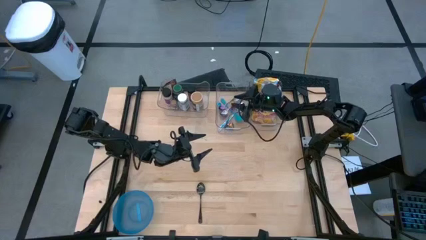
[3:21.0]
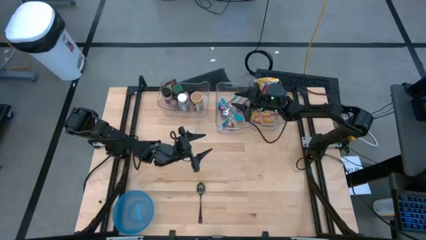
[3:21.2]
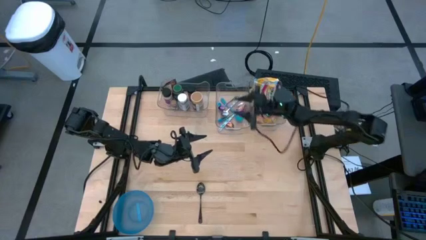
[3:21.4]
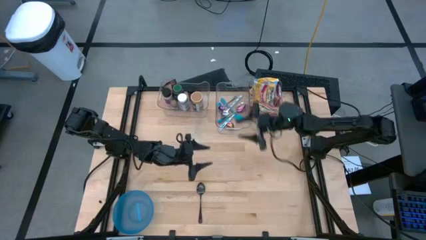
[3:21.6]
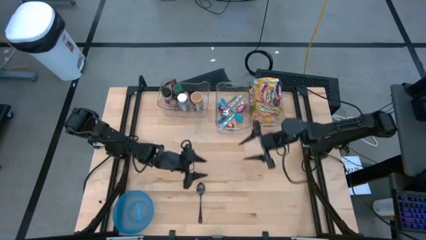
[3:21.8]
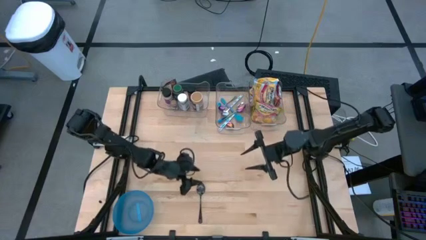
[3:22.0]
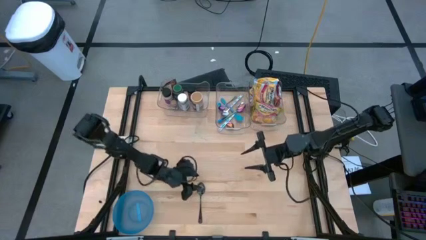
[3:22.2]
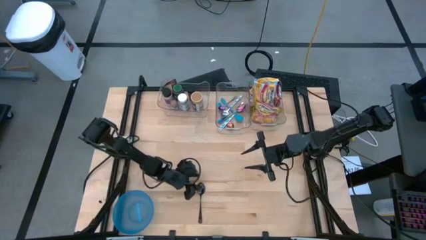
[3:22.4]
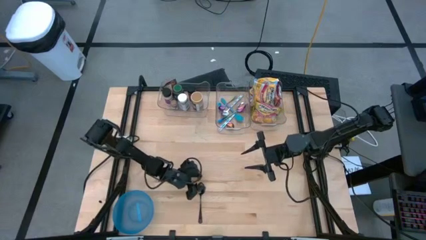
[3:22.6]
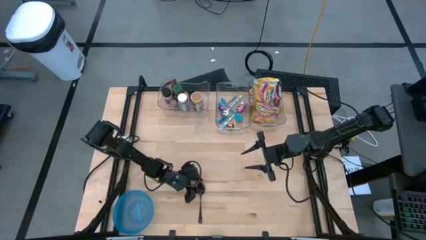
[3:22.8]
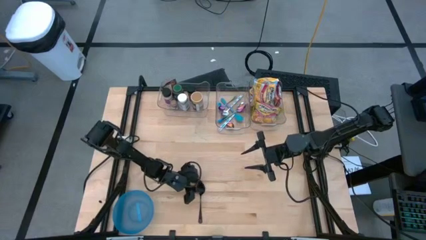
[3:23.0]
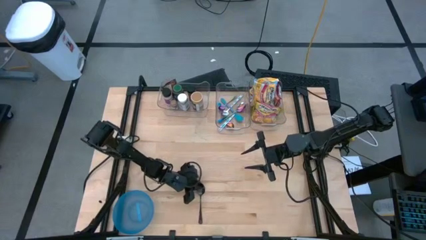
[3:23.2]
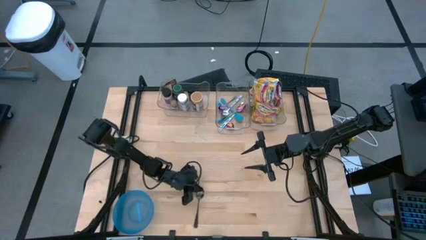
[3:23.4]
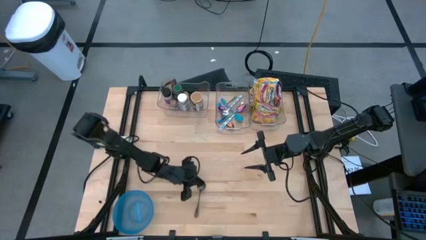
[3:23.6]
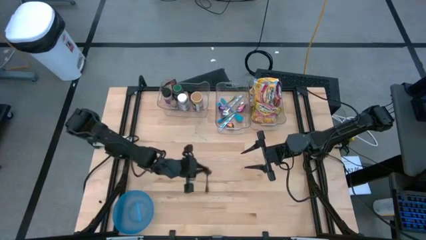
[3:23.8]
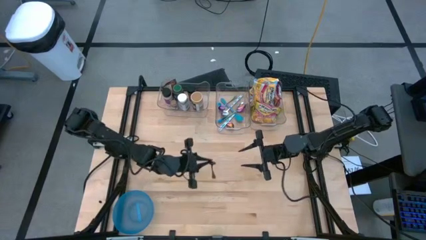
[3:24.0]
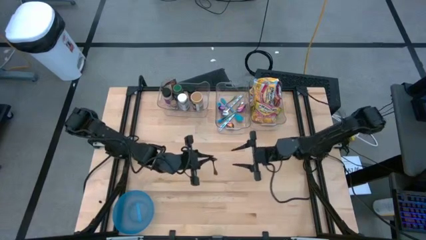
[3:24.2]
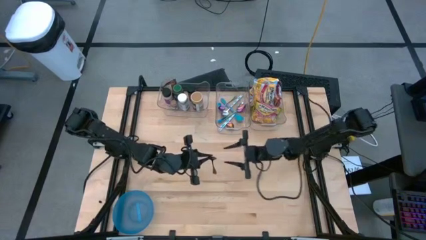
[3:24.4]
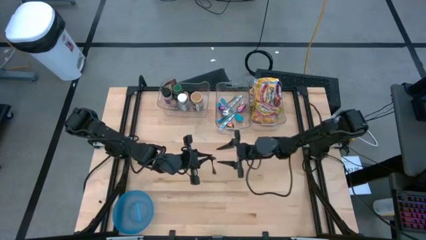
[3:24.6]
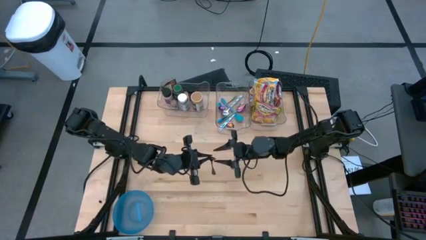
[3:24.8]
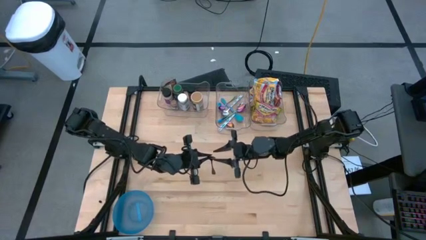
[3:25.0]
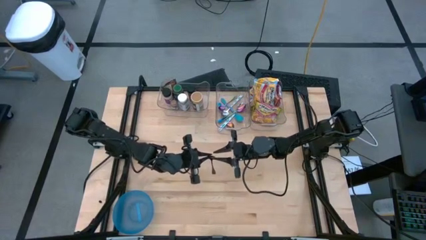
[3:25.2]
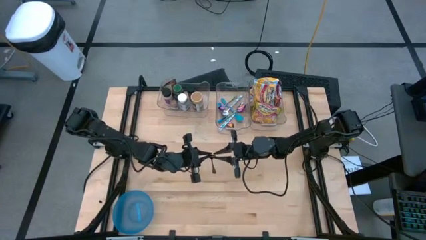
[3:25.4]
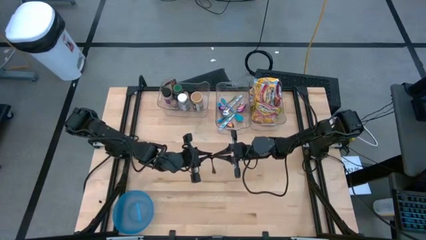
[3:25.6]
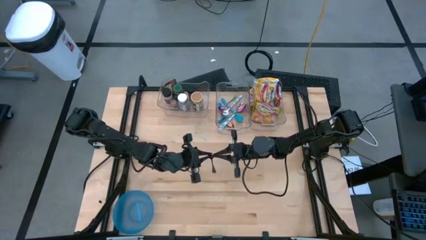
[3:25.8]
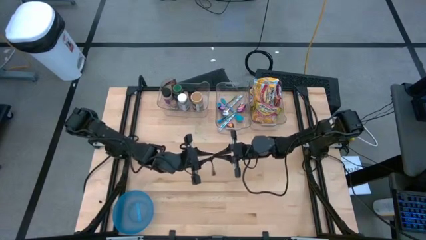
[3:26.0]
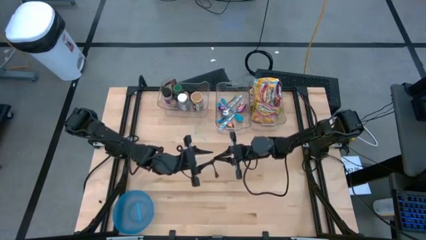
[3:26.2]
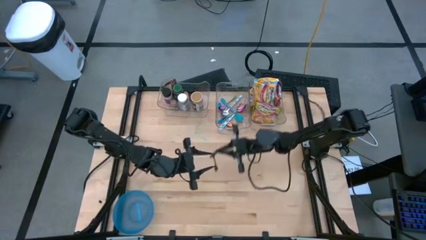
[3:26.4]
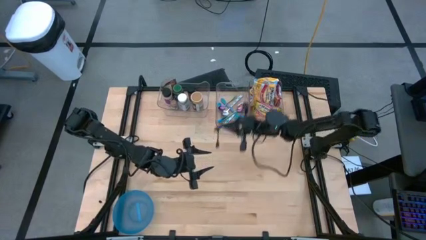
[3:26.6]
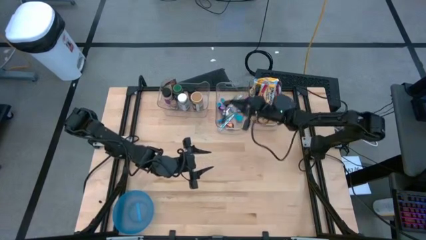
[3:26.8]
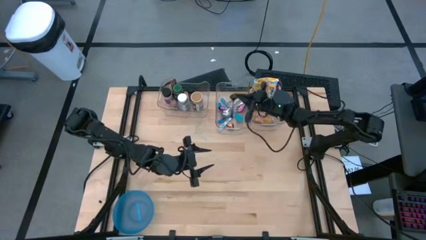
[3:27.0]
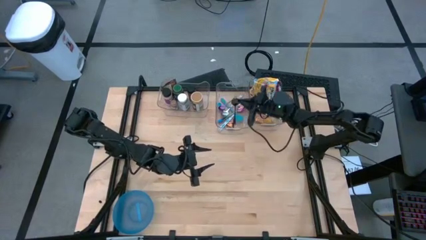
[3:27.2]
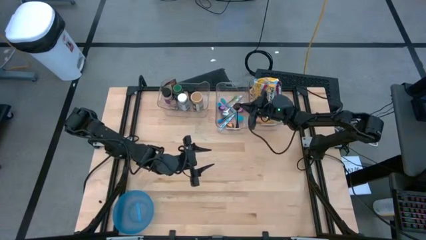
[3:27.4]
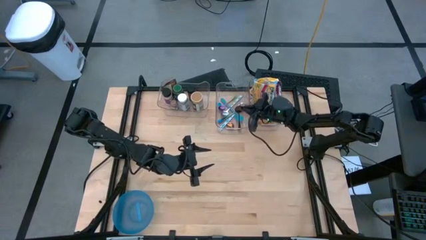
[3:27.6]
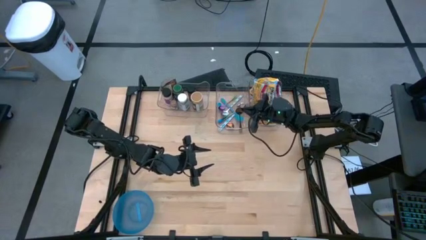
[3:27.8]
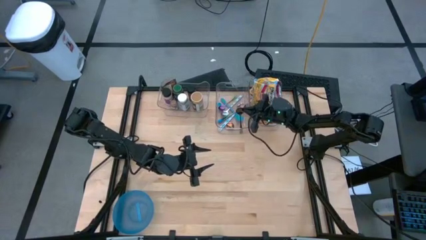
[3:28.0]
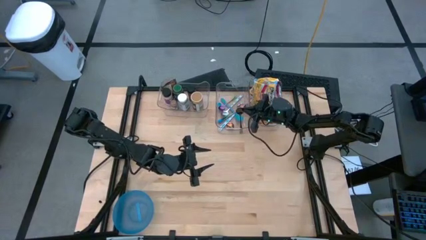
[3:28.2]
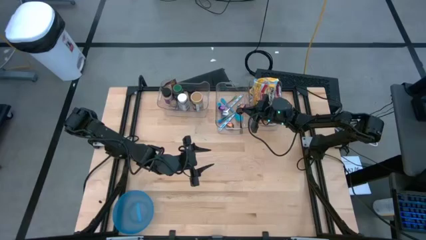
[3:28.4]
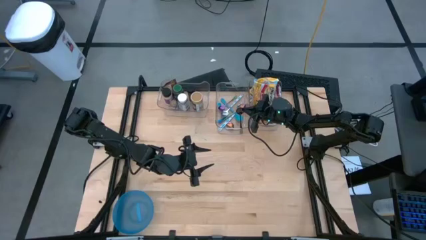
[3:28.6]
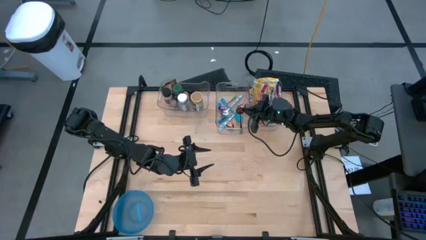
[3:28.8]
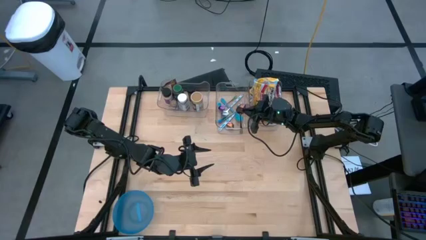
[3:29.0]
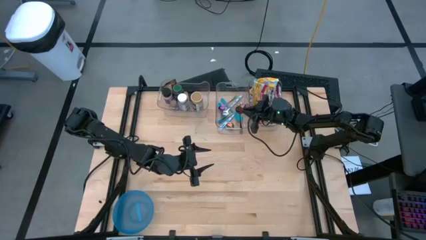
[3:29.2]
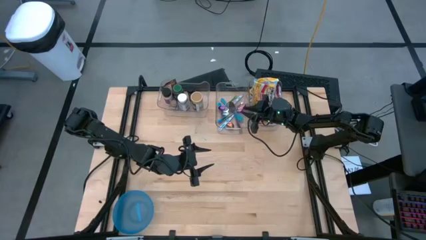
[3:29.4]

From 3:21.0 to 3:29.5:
Task: Pick & Place Food Item
Put the black spoon into the middle transparent bin

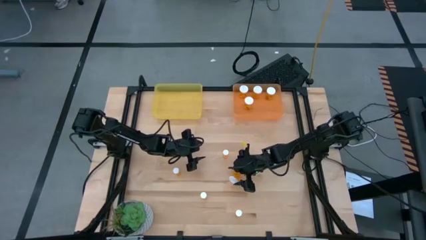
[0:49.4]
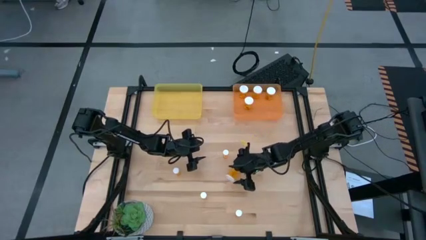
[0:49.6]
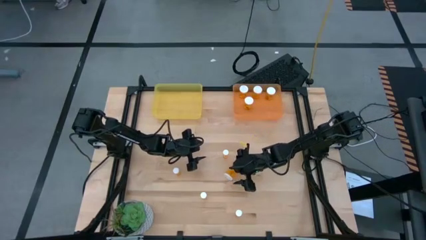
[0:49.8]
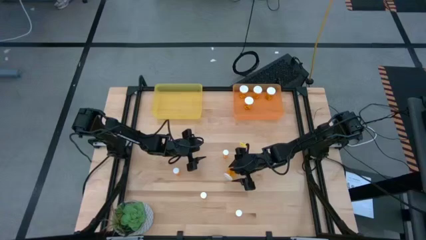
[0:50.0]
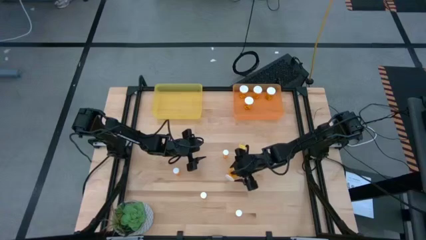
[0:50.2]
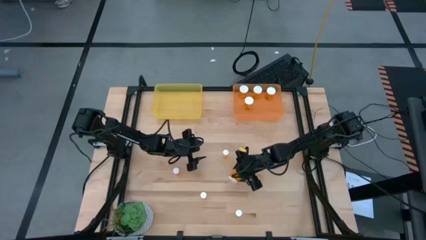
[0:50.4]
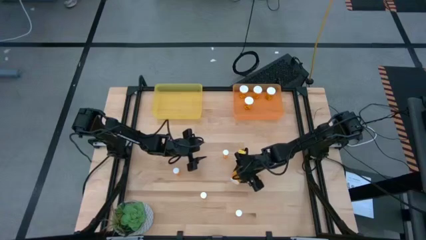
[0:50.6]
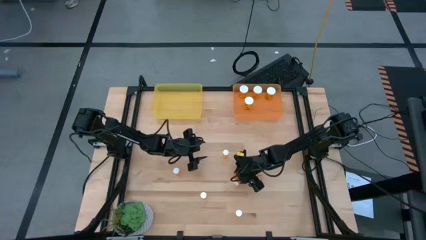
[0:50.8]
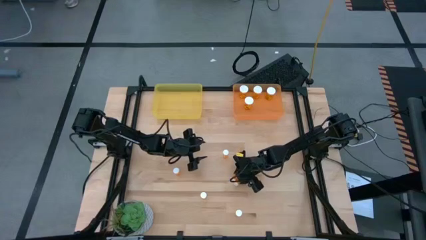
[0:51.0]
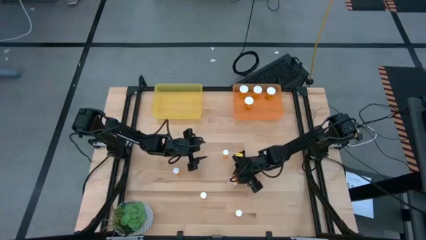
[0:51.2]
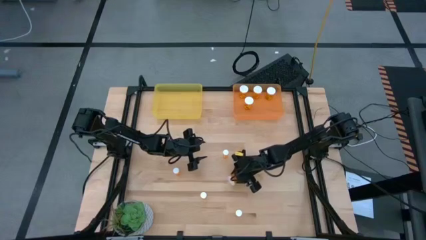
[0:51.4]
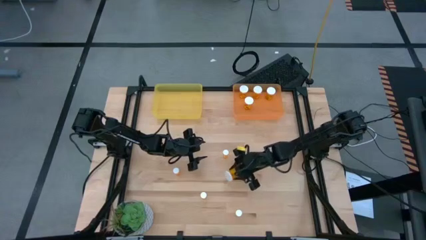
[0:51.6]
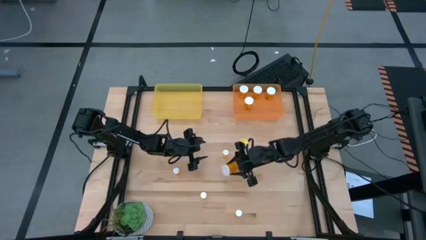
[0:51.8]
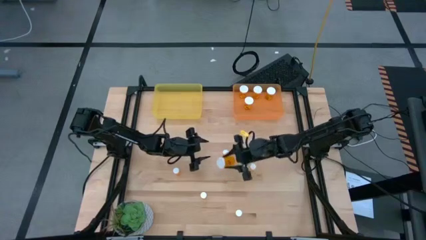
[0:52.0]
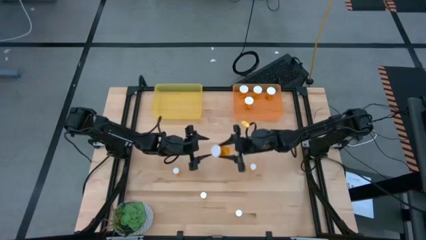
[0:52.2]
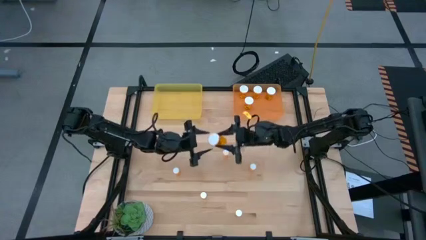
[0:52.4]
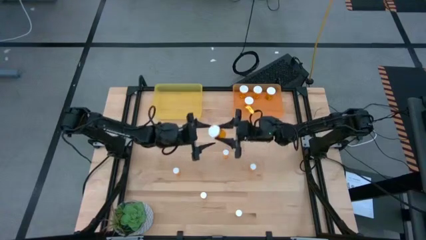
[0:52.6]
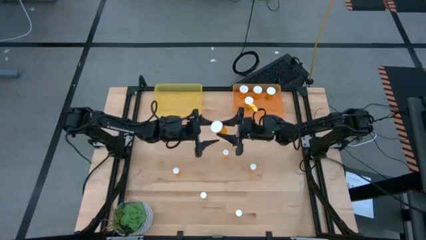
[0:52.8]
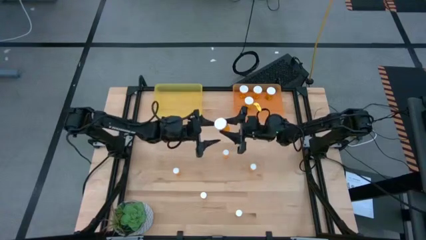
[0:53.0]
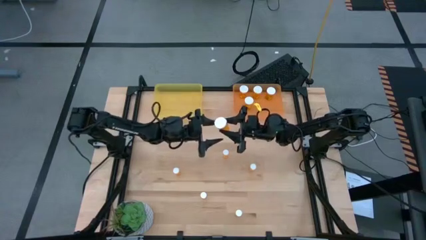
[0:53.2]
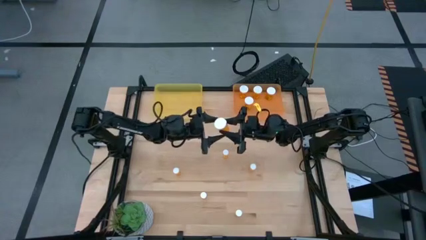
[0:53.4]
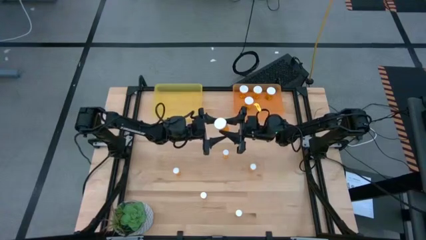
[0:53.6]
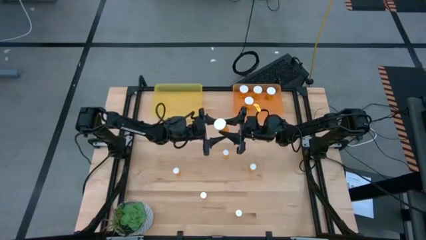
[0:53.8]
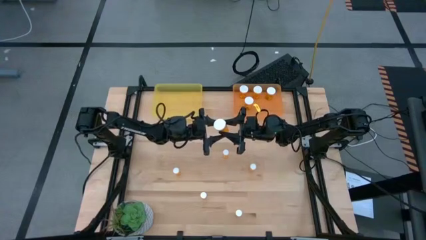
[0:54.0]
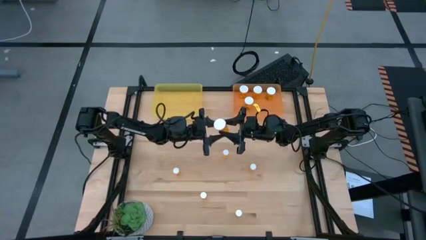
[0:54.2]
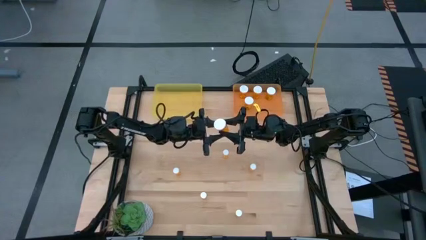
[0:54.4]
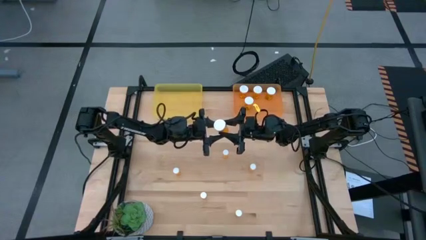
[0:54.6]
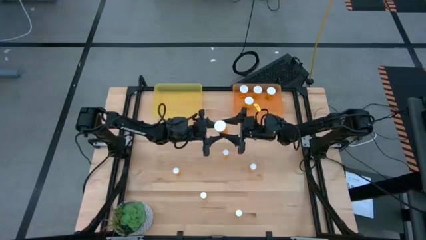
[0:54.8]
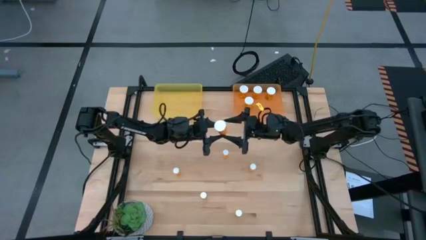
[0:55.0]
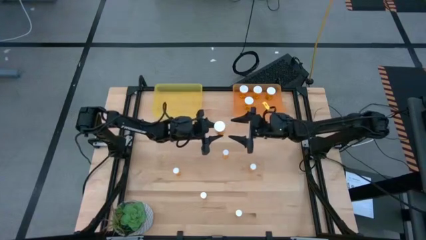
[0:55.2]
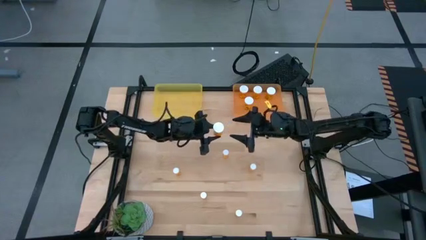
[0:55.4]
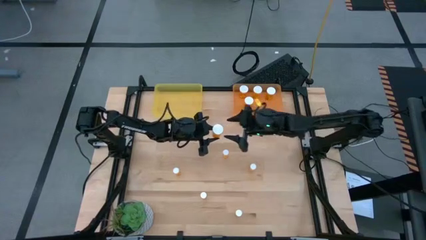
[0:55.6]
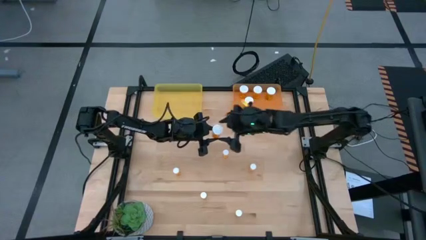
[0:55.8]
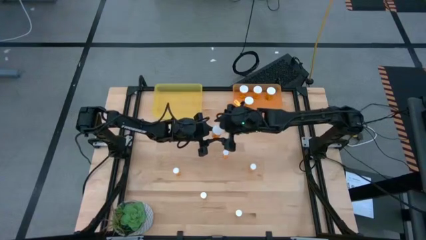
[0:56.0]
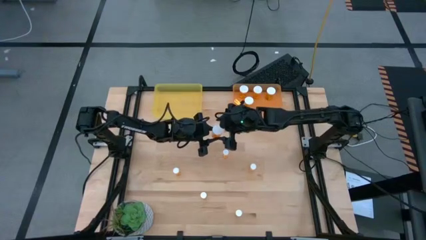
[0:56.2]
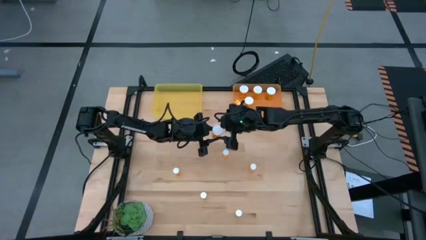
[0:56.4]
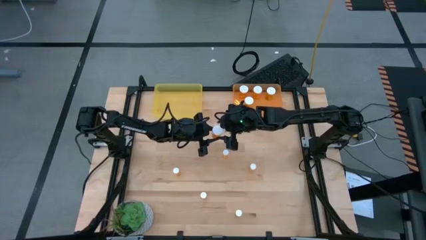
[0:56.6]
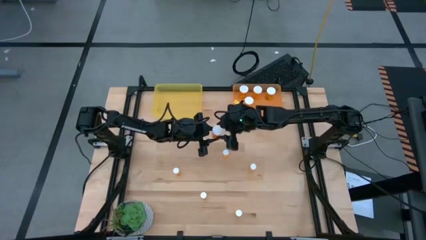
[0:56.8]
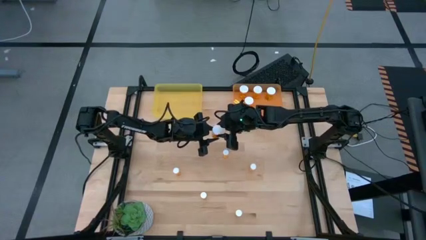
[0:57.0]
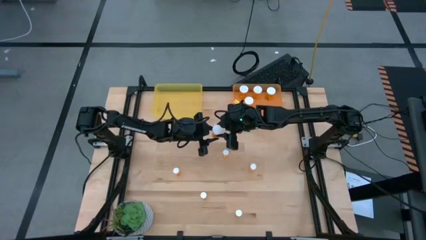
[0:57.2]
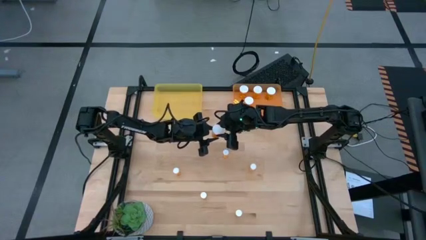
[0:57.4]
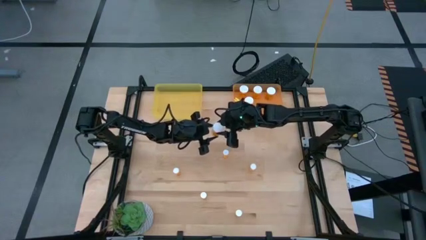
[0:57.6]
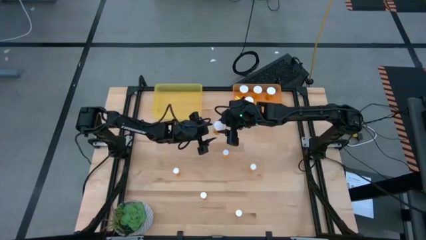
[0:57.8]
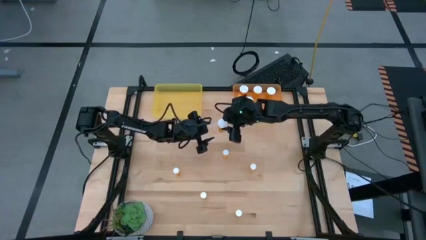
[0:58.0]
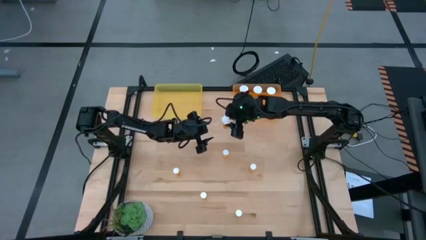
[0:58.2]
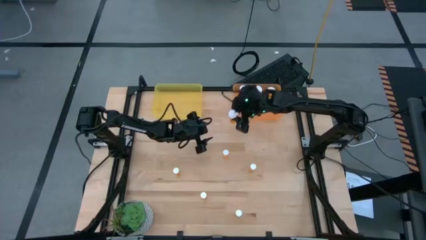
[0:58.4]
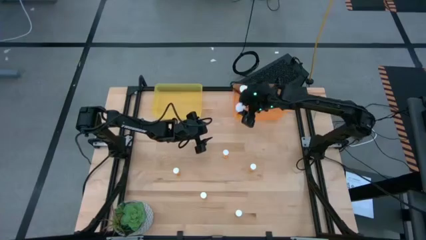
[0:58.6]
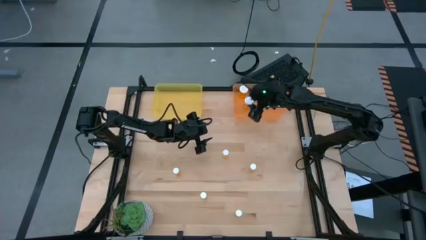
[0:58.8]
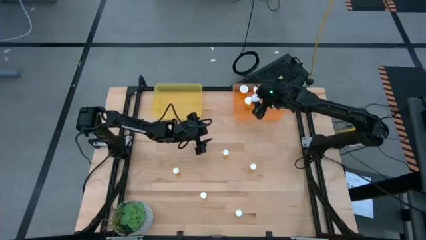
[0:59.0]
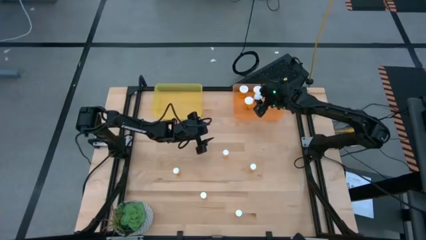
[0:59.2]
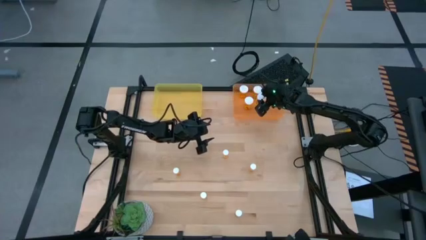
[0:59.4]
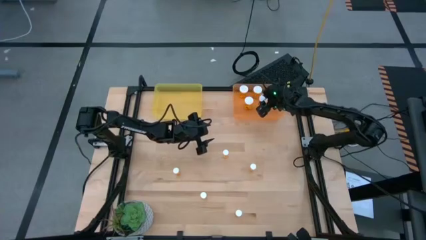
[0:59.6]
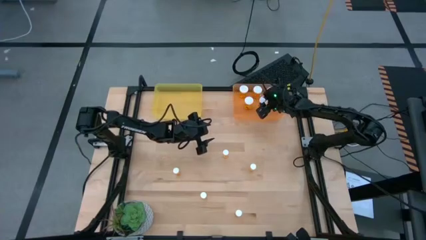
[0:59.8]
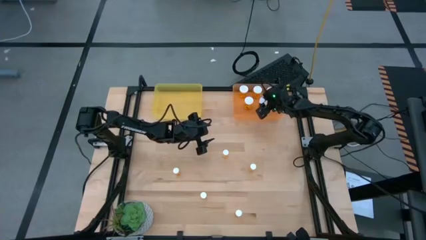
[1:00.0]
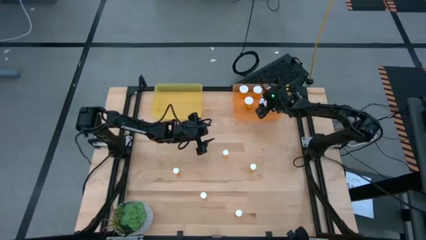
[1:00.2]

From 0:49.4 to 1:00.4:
Task: Pick and place medicine bottles into bin by pill shape (circle, oval)
Put the big yellow pill bottle into the transparent orange bin
